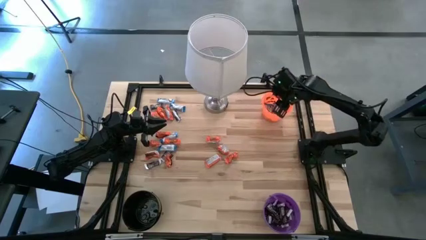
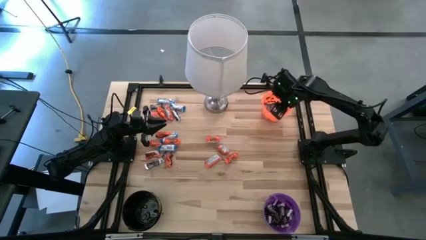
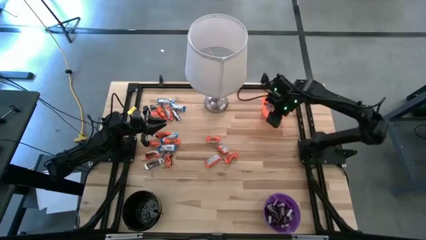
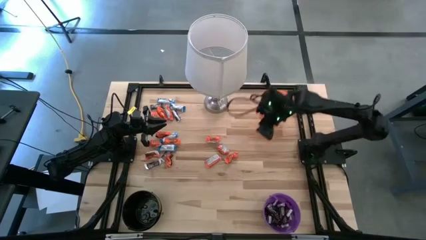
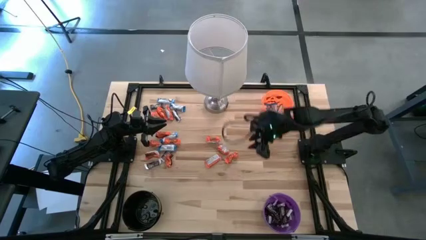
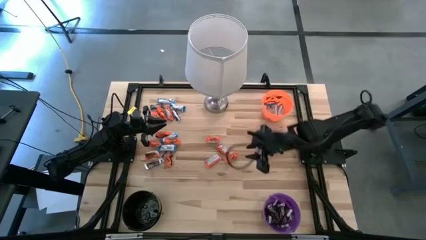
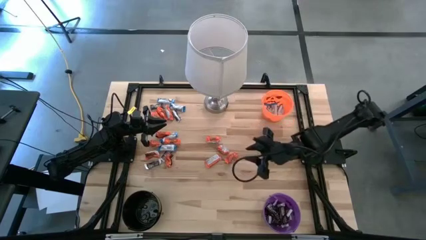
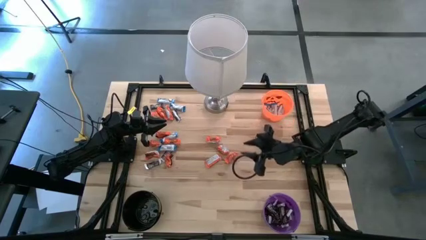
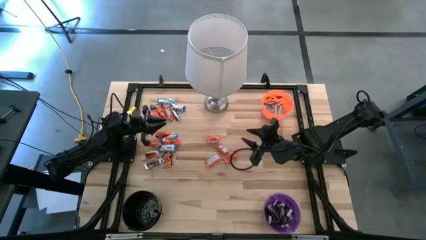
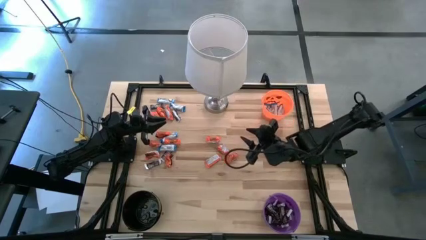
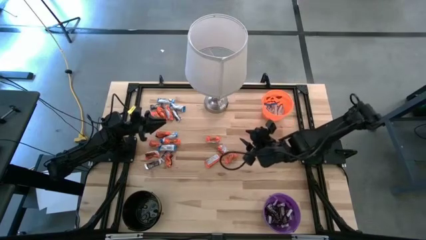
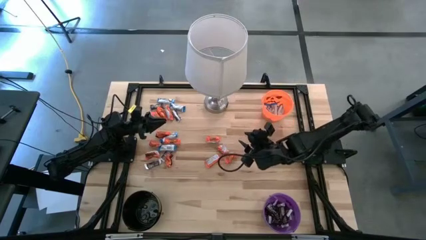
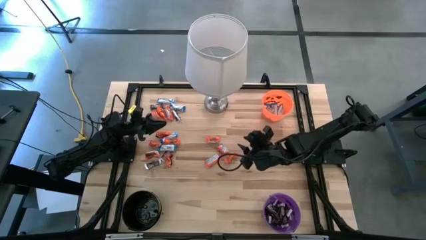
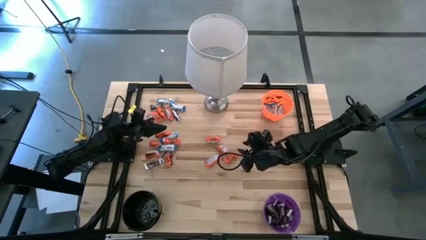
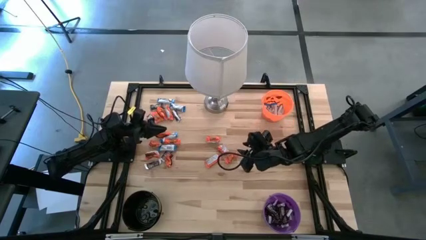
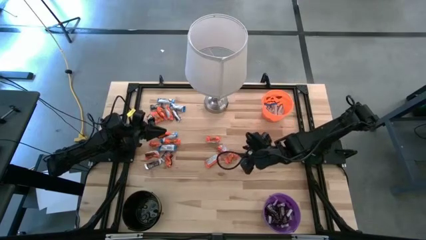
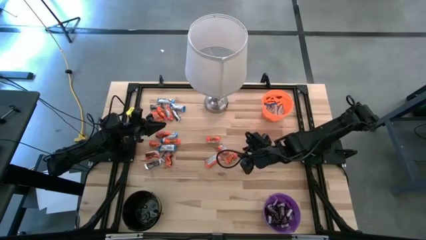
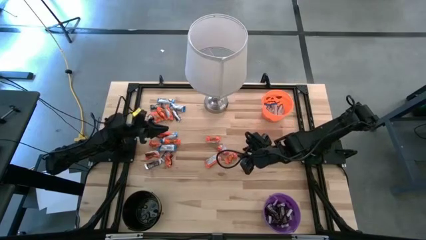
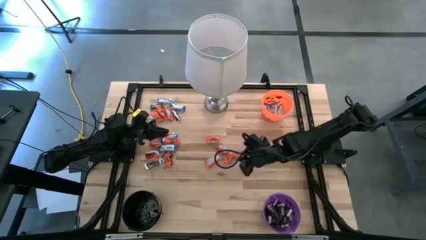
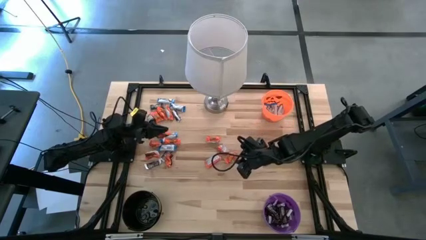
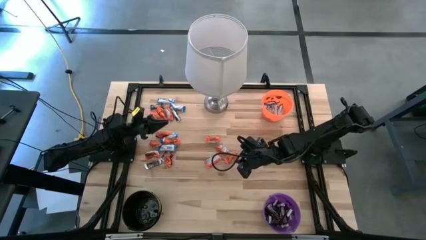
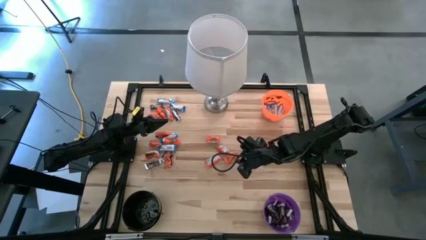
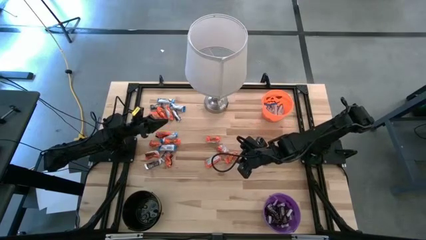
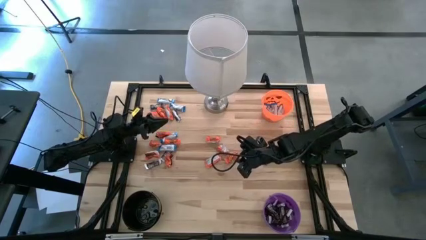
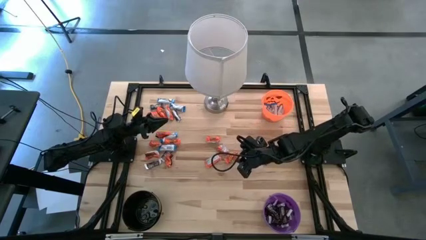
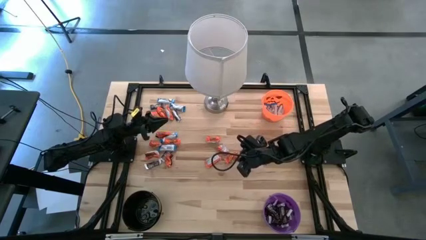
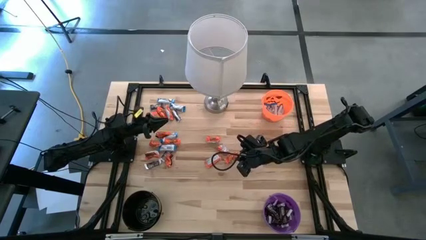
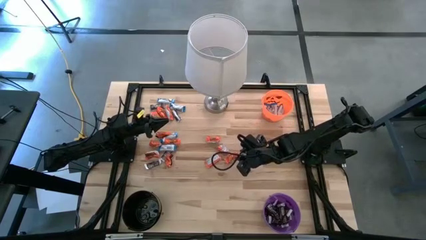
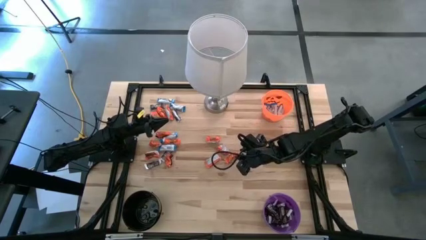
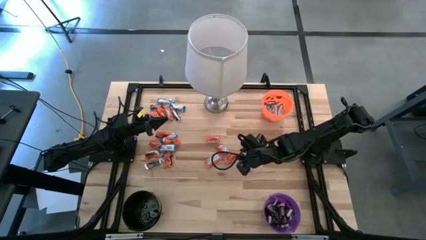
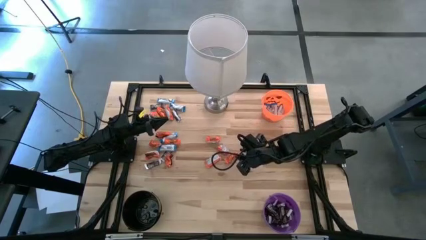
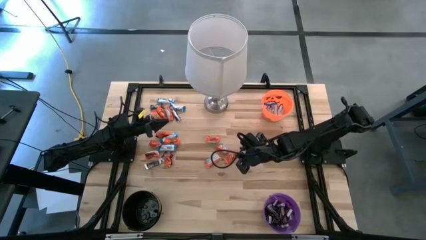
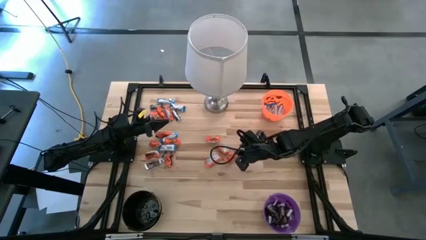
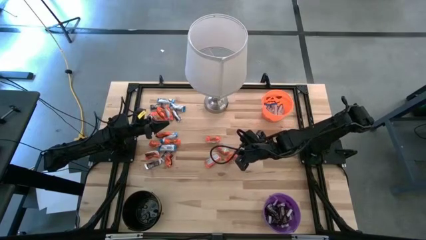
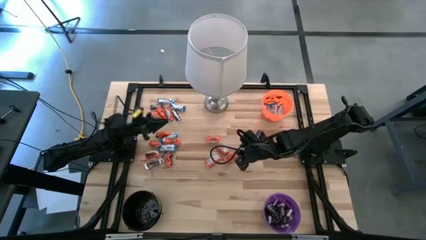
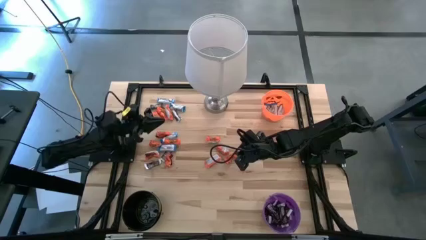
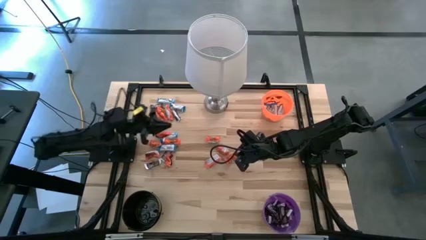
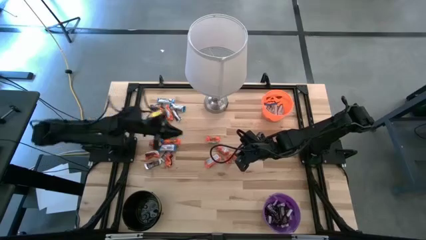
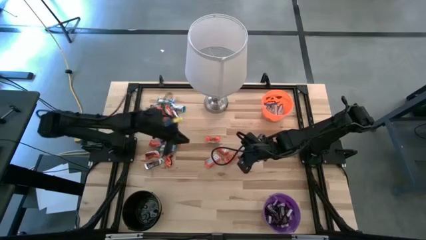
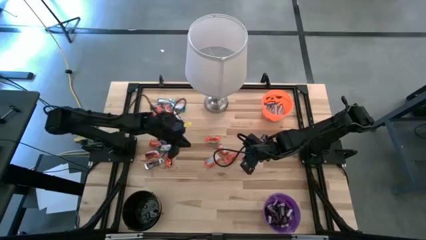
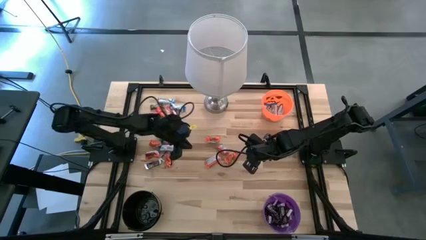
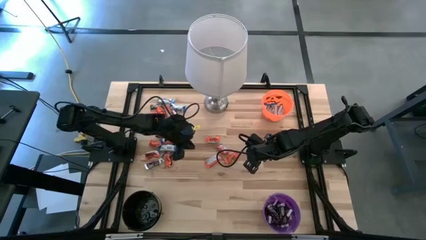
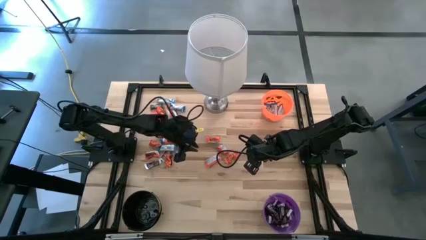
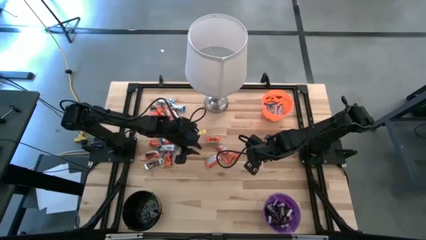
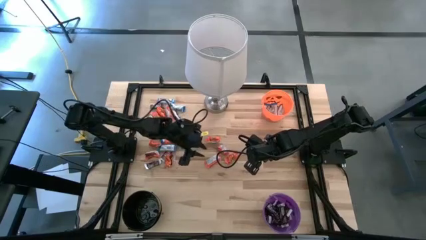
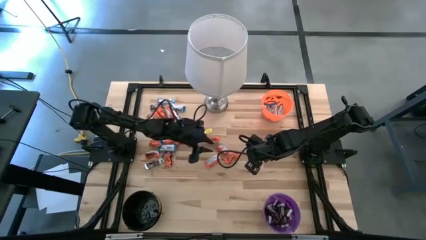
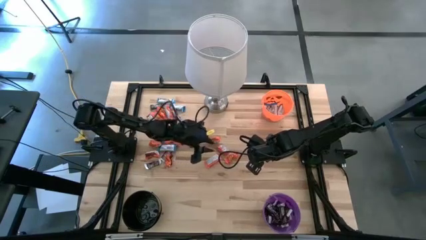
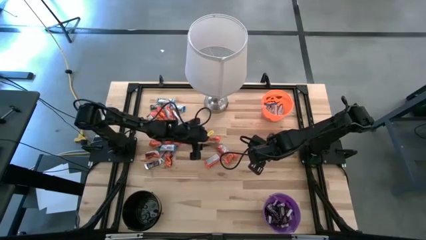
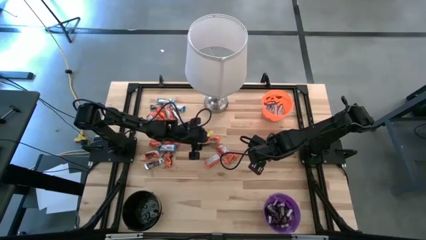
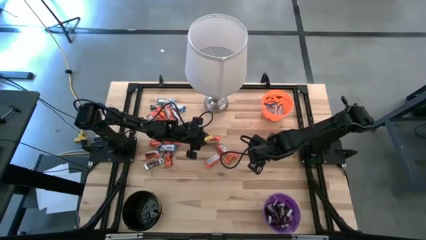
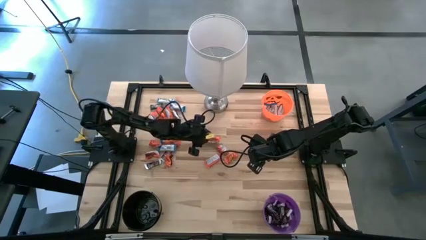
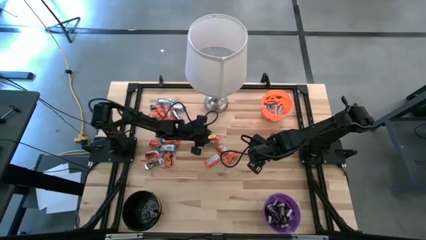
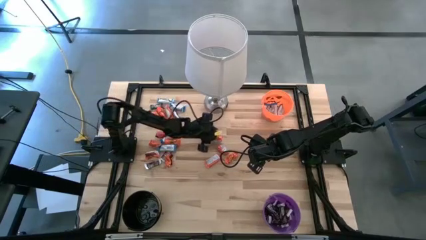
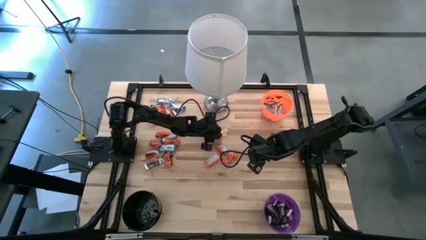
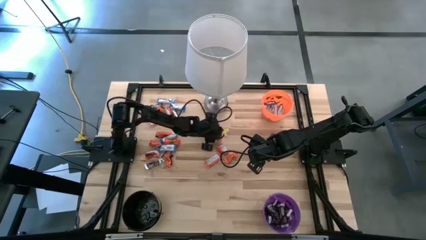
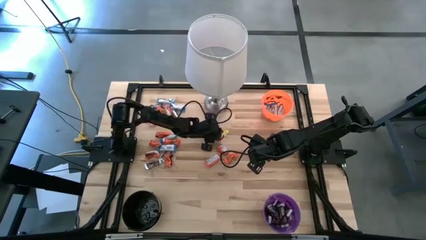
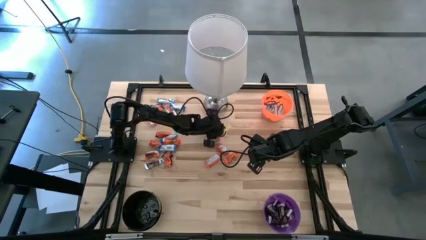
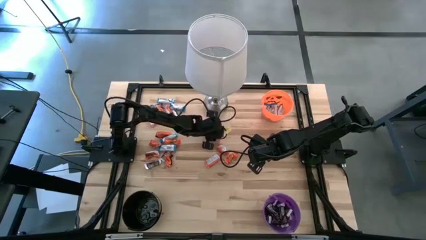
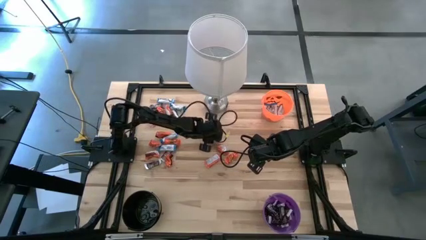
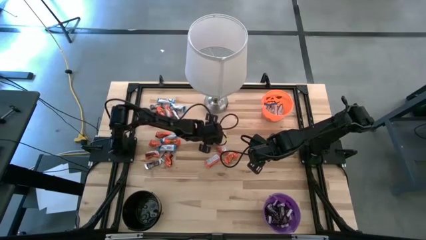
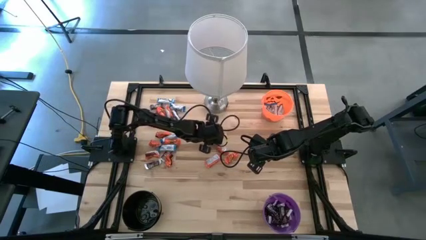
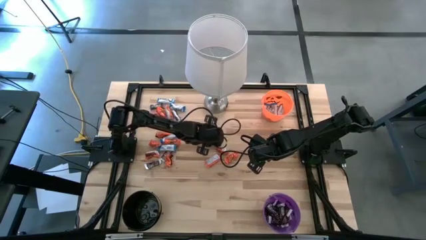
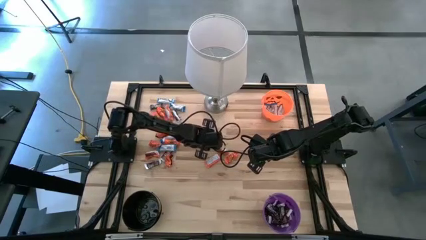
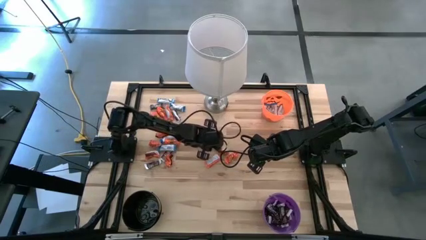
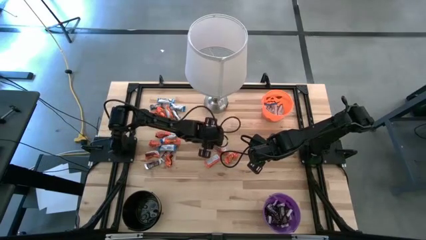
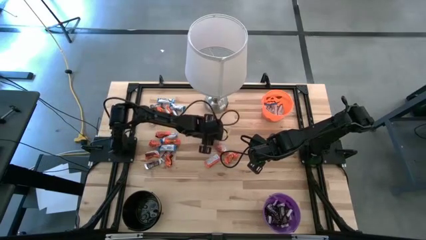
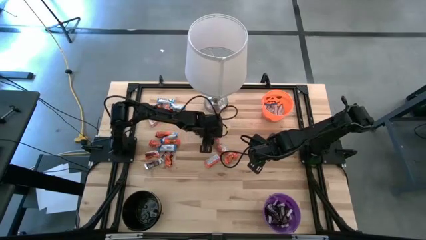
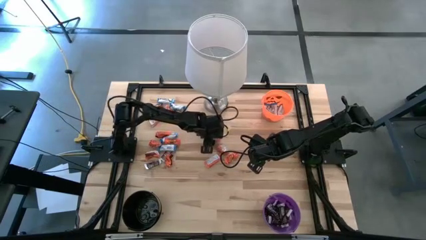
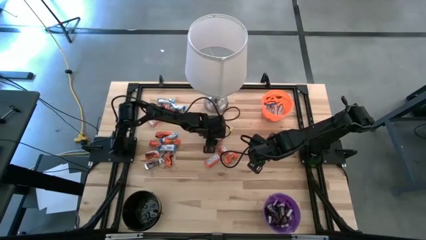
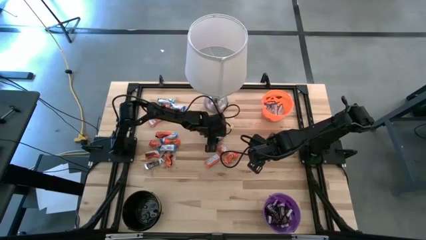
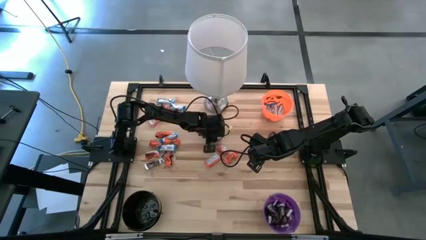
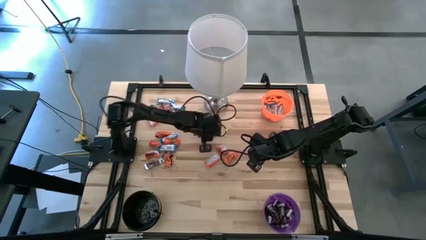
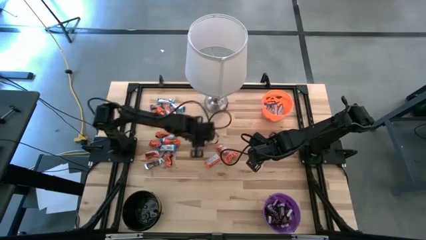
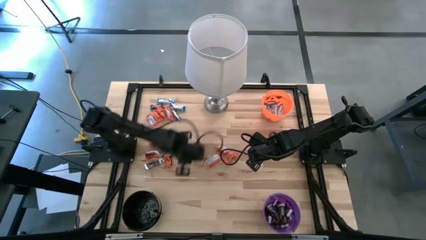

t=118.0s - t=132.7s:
Task: Sort candy
Put the orange chocolate bar into the black bucket

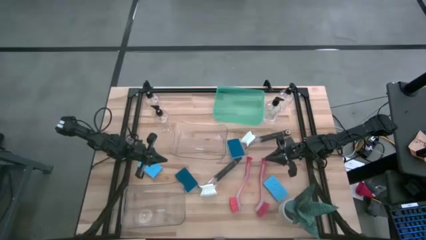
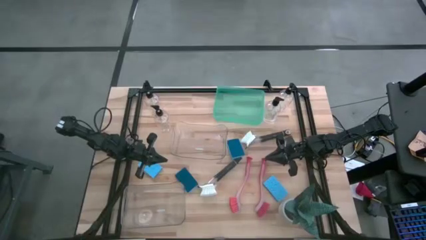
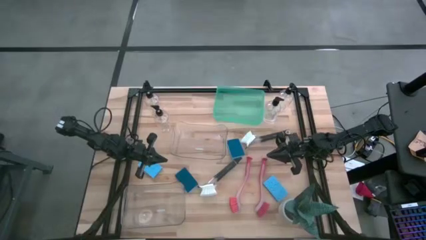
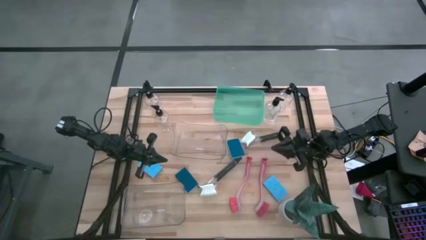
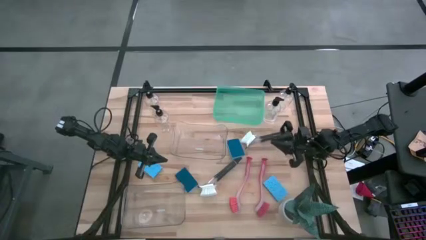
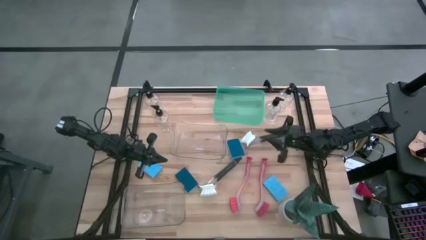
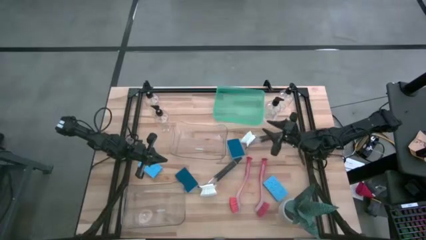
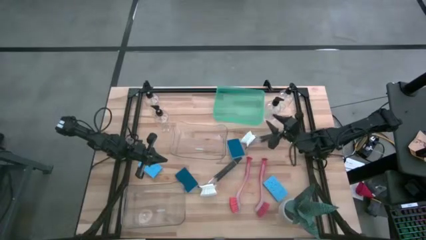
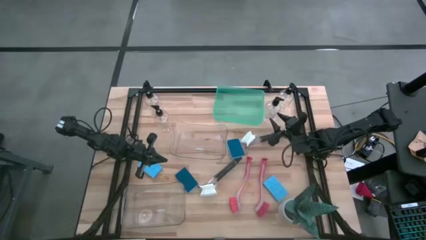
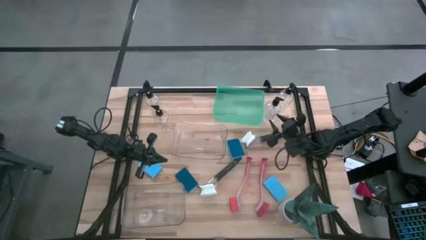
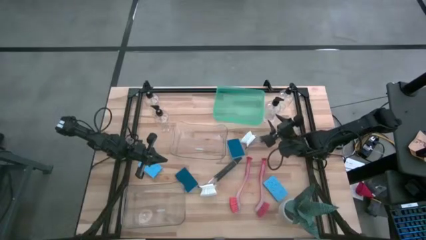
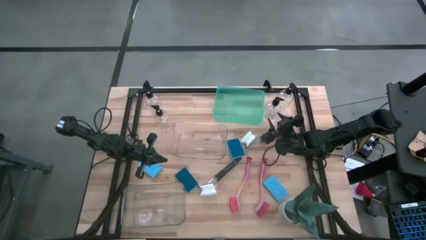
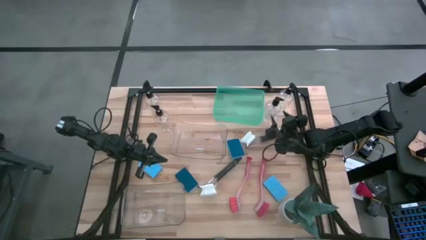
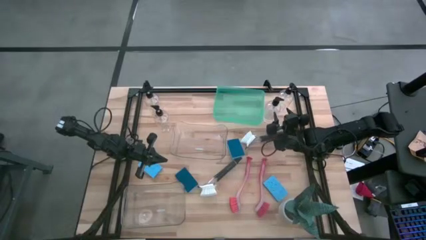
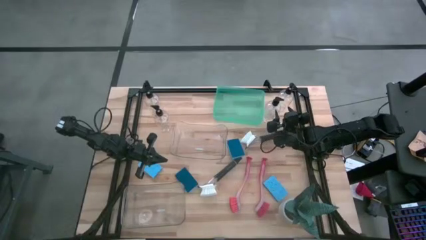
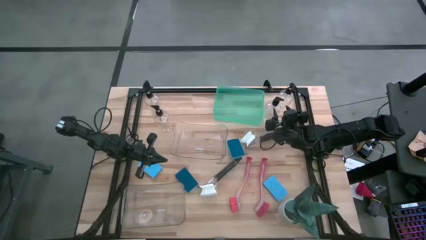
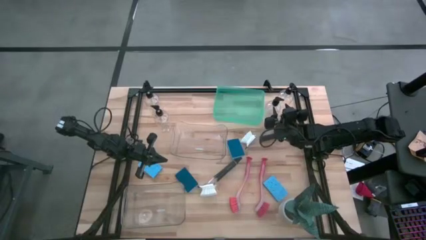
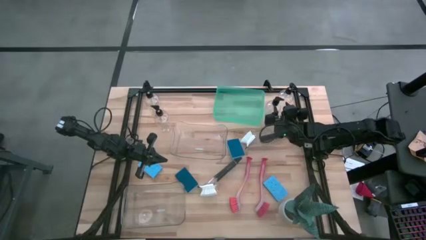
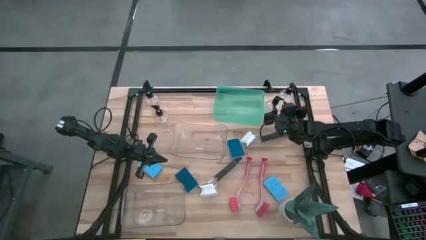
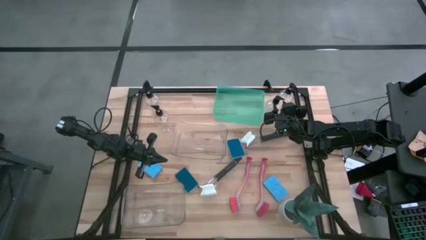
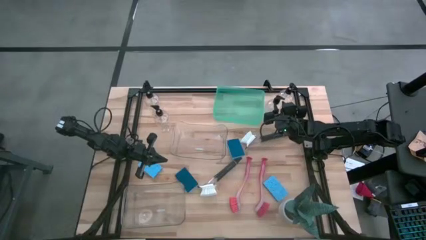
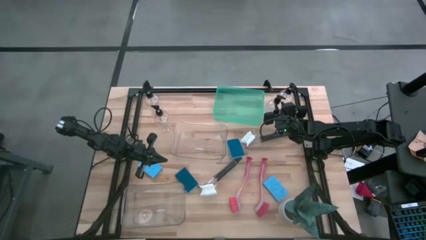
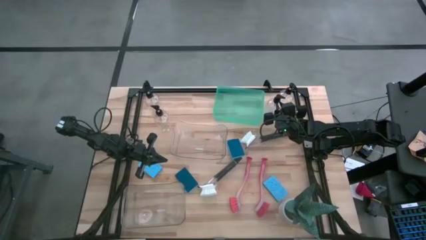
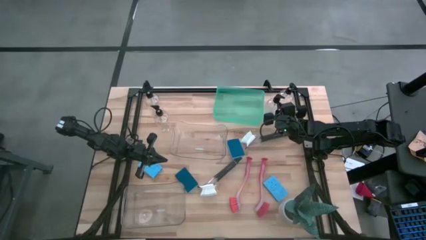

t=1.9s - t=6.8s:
Task: Pick & Place Kitchen Sink Supplies
Put the transparent soap dispenser into the green bin
